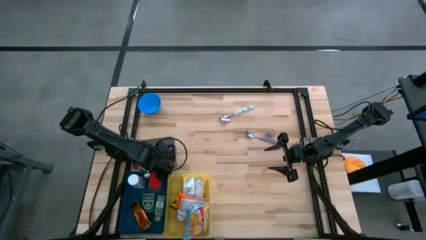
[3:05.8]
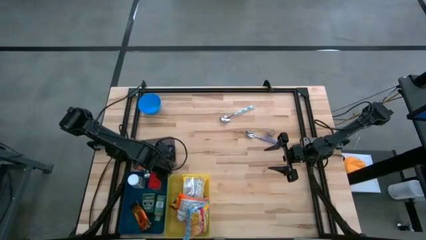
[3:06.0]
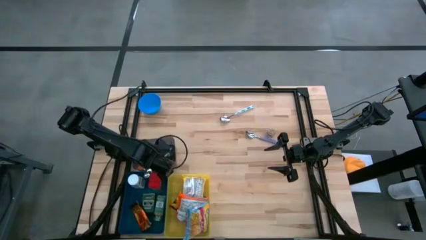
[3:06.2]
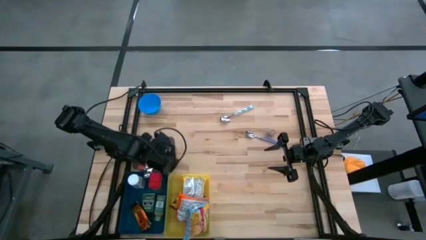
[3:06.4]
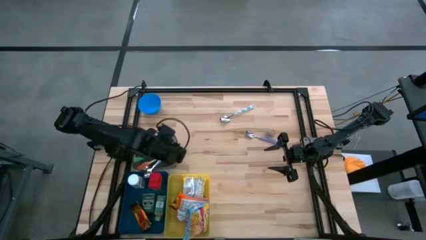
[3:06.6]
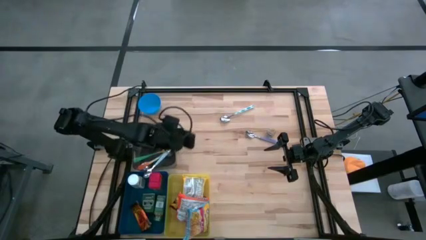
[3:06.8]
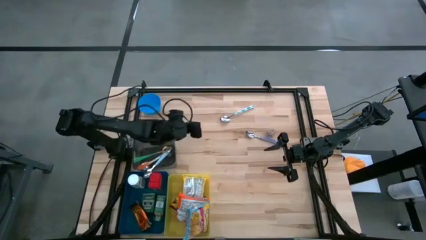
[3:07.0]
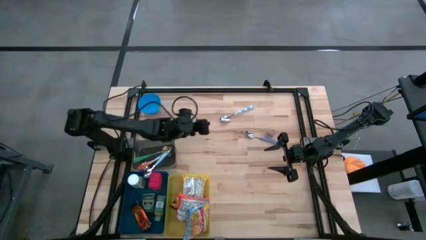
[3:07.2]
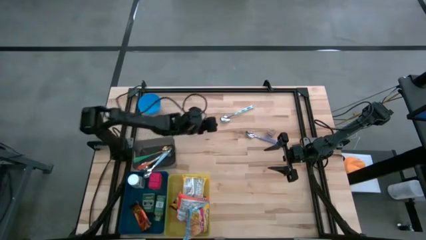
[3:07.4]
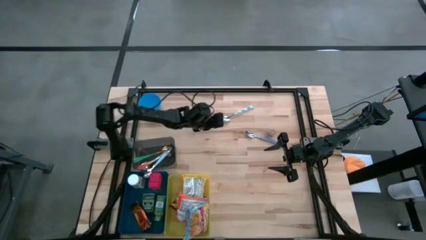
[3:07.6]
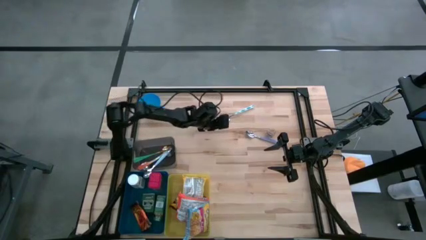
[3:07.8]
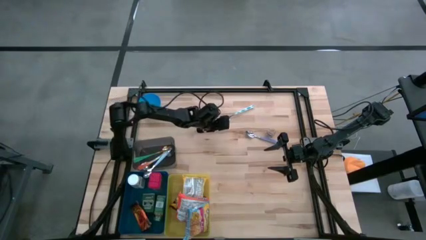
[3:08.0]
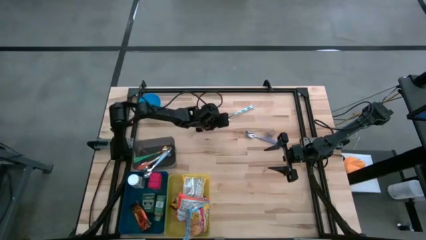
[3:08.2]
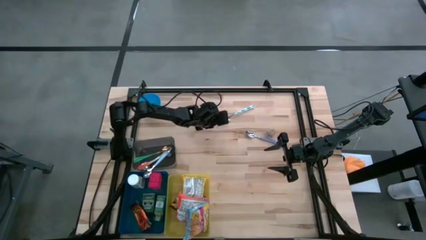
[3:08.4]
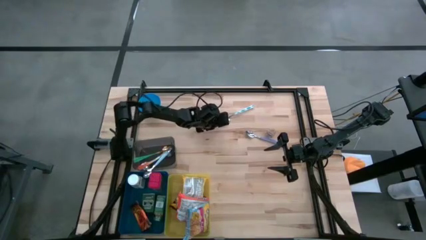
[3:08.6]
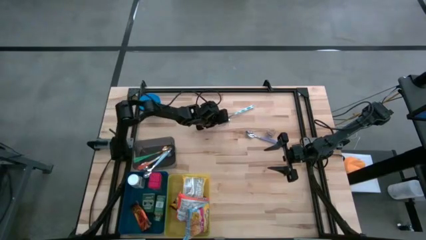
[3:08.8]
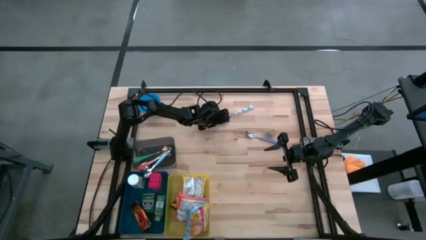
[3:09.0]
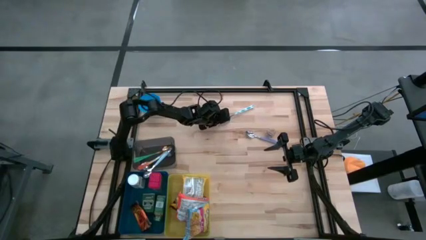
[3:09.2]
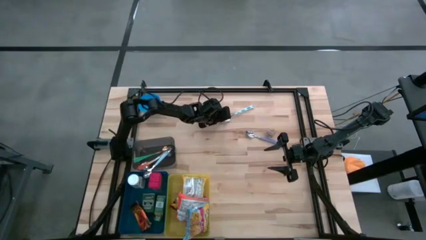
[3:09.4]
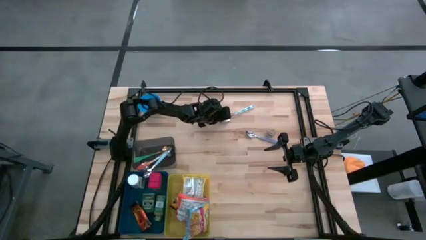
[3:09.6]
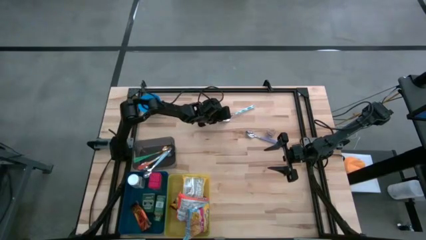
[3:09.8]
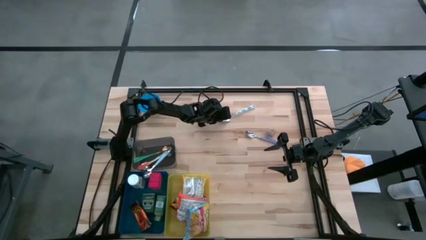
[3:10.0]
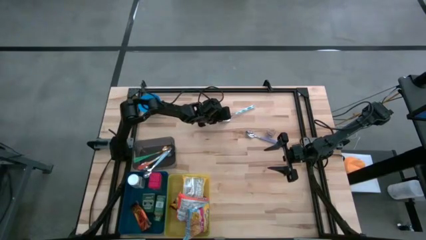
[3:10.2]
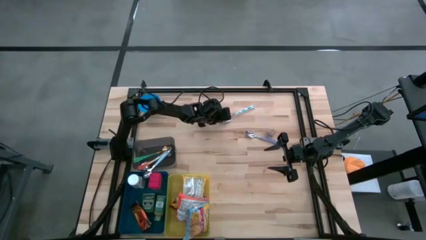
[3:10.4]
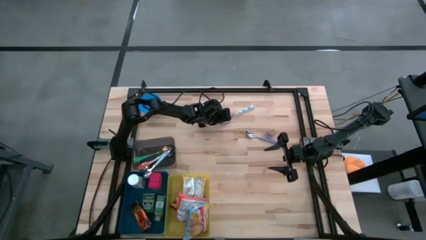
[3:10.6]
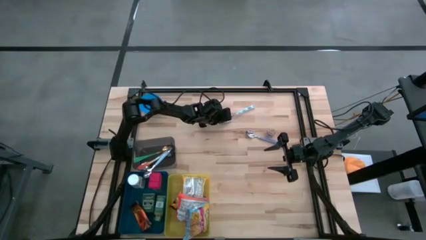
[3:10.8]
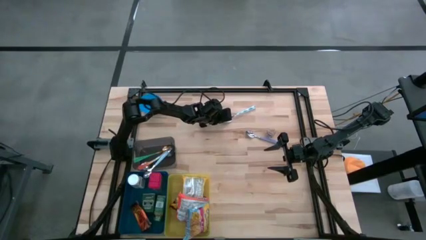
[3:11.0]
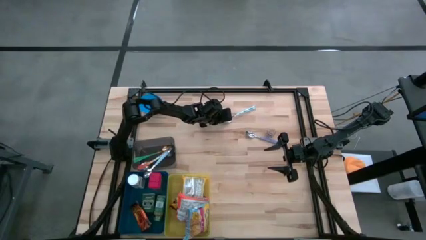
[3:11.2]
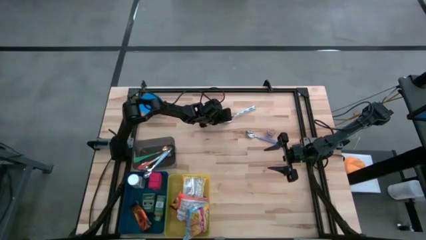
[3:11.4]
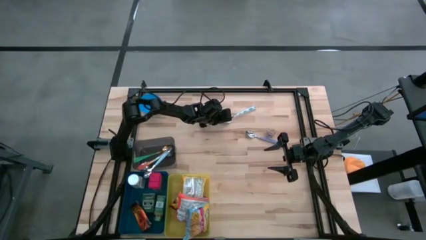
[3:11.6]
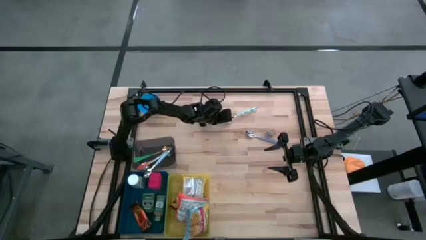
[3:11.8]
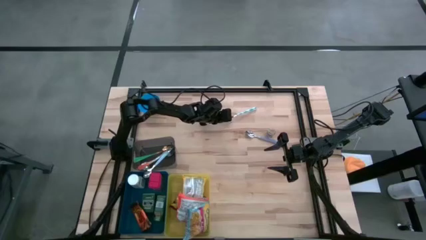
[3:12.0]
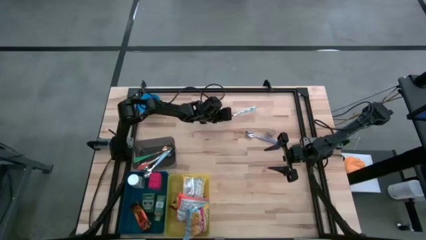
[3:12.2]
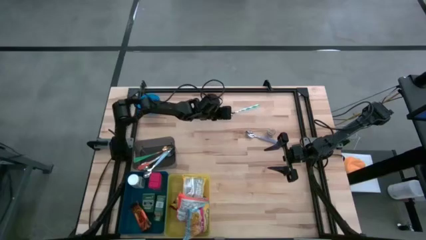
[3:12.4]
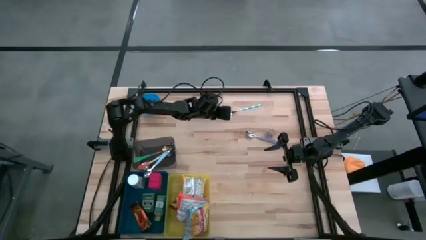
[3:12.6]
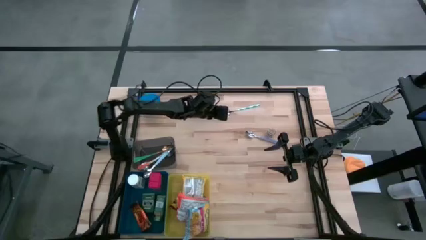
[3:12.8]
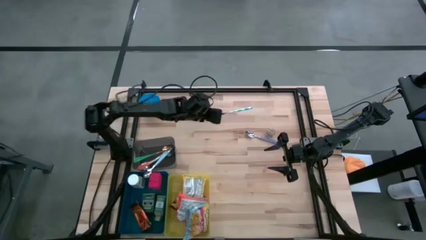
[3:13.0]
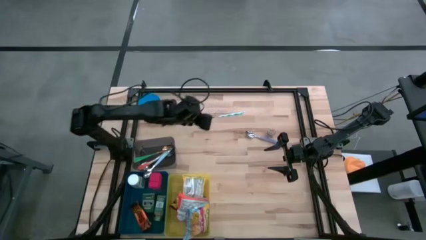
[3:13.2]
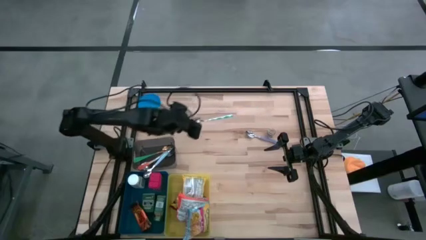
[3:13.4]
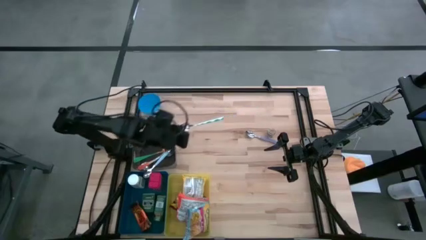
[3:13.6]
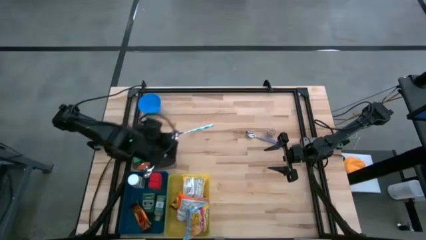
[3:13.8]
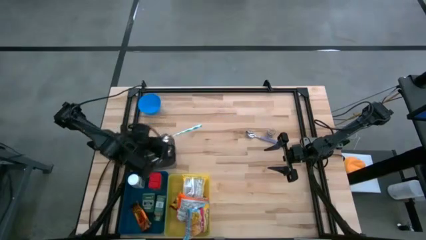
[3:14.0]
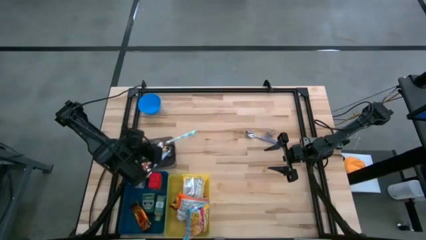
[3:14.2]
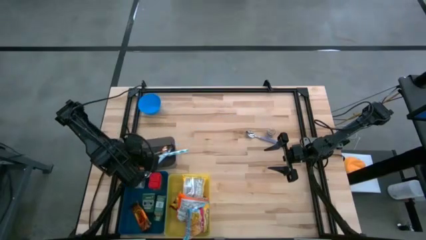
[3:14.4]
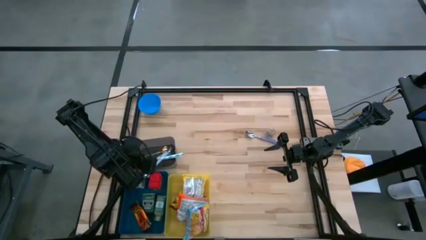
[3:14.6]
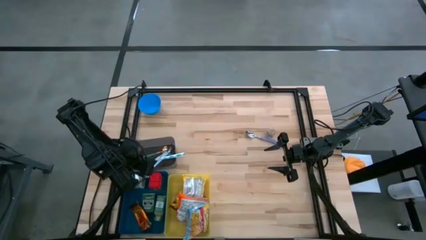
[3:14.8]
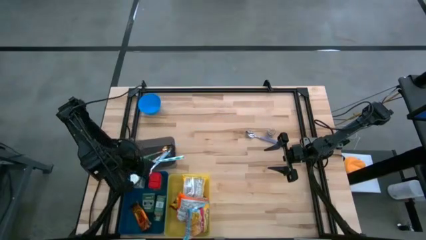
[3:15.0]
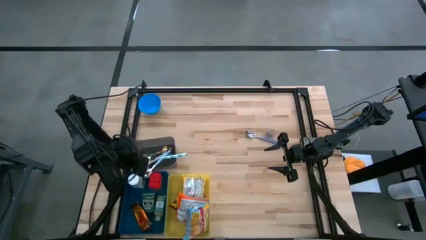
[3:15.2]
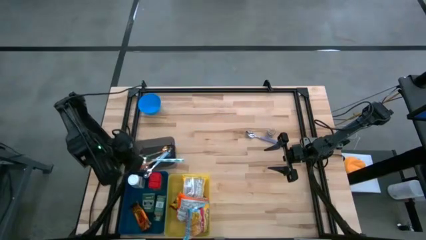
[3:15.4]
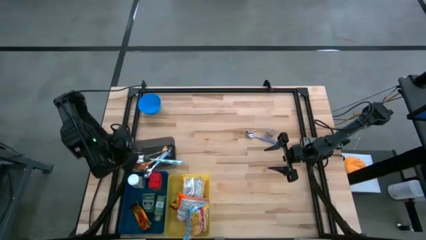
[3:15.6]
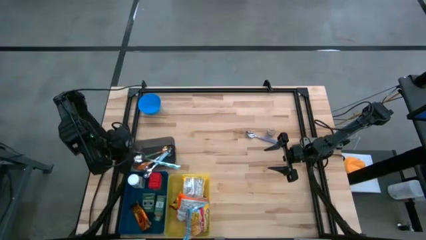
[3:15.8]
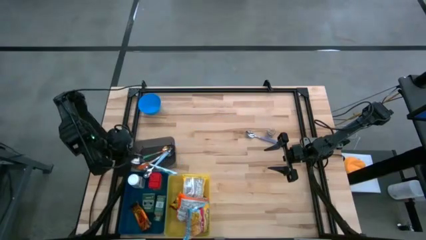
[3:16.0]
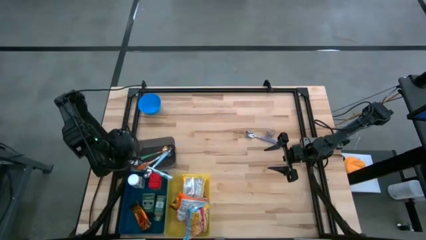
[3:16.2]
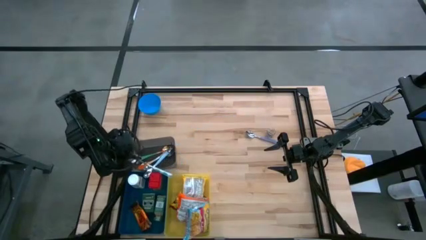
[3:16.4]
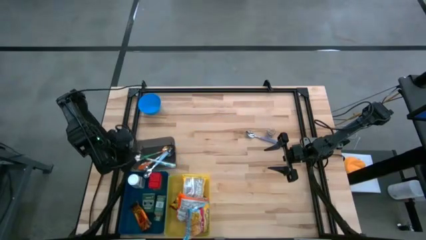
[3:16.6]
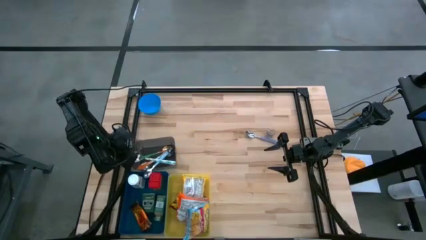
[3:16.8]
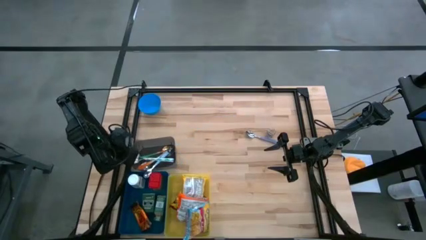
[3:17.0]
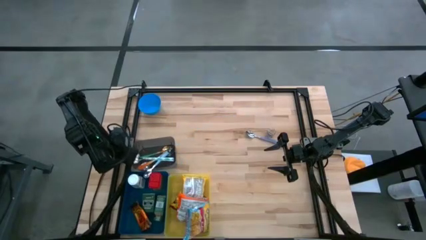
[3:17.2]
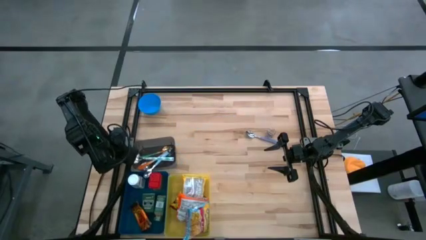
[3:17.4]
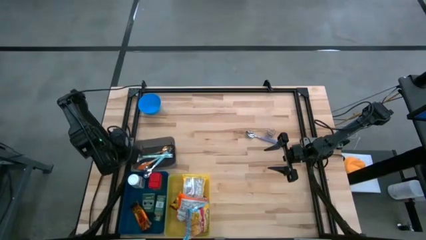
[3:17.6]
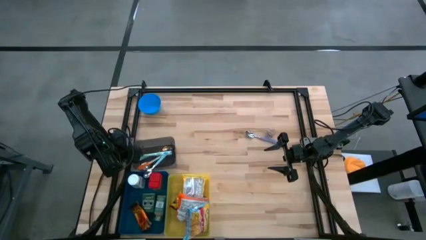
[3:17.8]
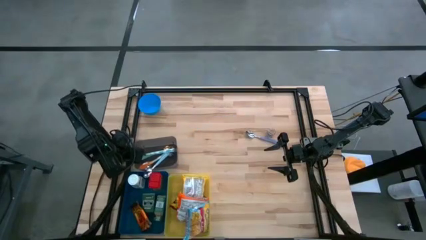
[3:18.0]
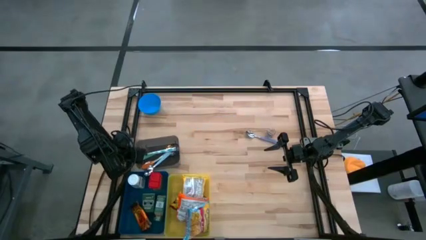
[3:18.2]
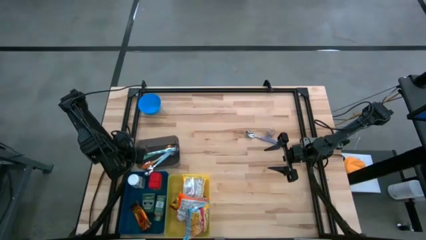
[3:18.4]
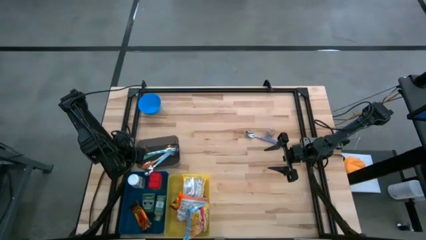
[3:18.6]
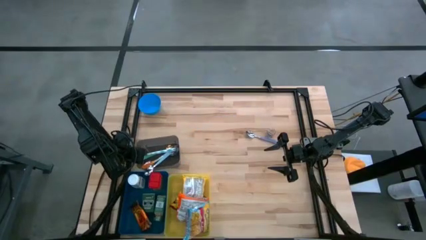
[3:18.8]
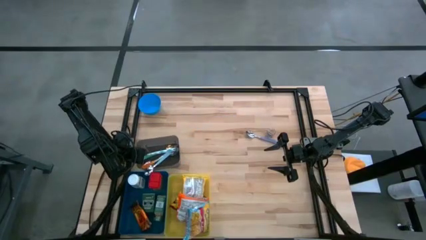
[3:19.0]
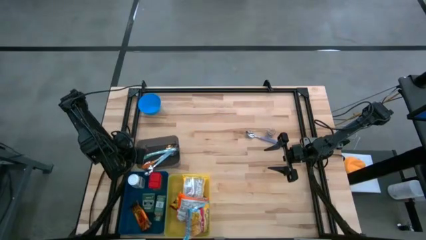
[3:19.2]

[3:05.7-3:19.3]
Put the patterned blue spoon into the gray bin

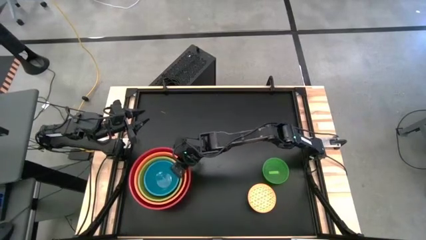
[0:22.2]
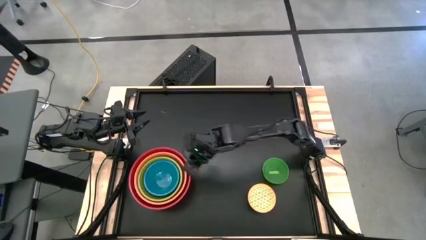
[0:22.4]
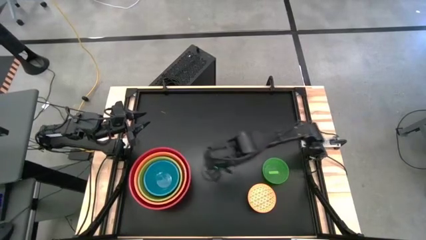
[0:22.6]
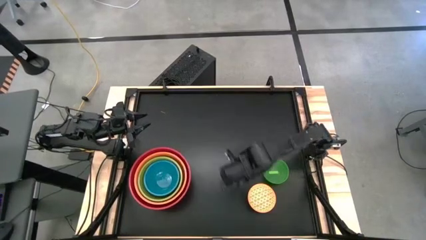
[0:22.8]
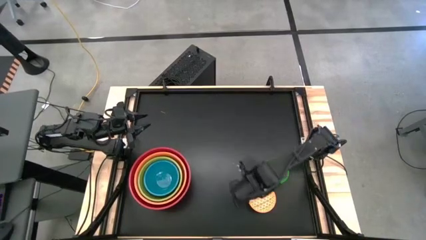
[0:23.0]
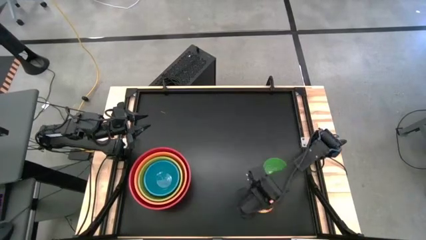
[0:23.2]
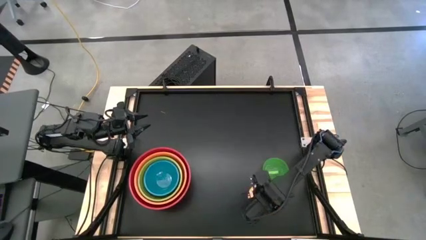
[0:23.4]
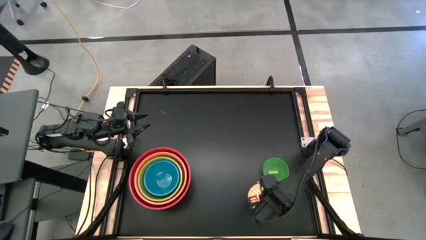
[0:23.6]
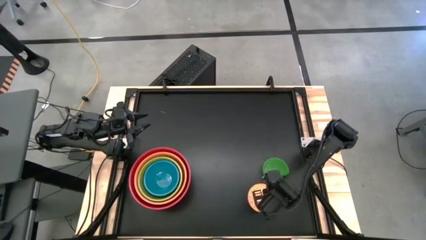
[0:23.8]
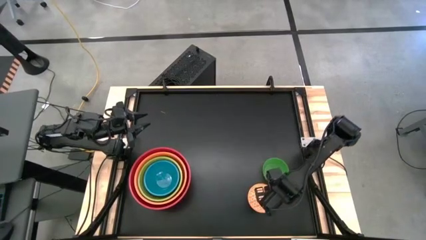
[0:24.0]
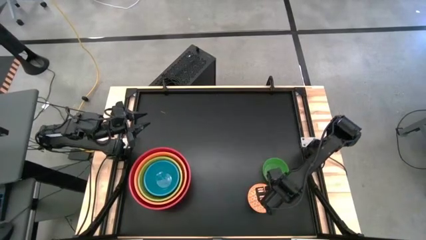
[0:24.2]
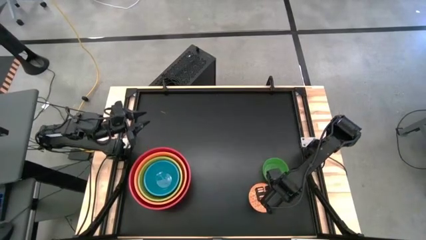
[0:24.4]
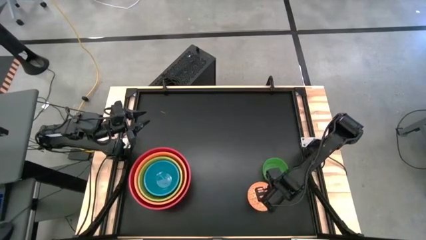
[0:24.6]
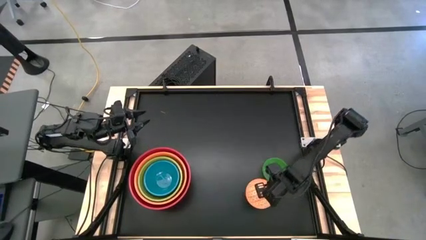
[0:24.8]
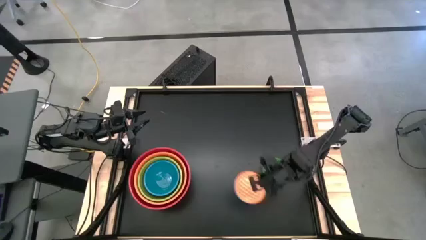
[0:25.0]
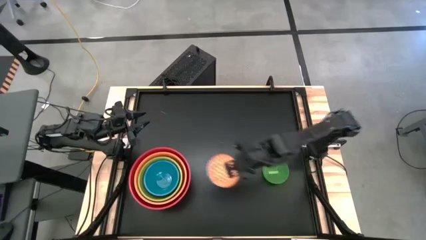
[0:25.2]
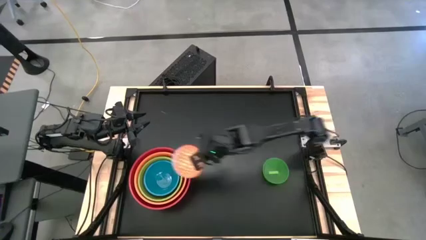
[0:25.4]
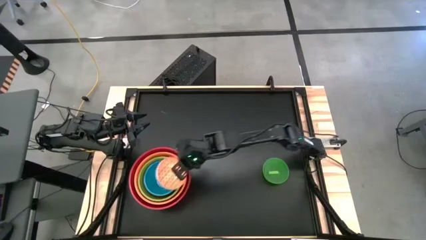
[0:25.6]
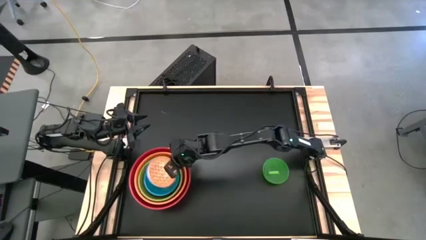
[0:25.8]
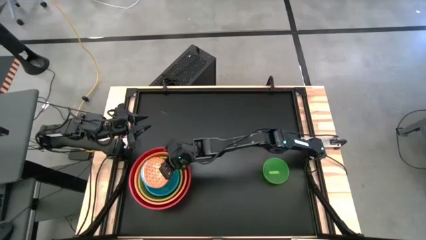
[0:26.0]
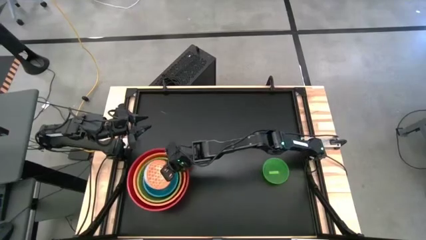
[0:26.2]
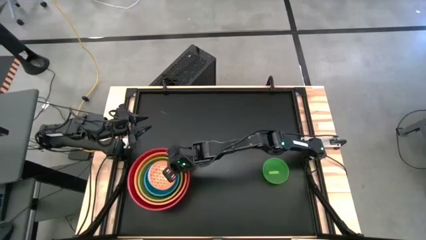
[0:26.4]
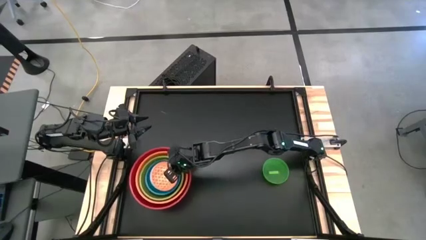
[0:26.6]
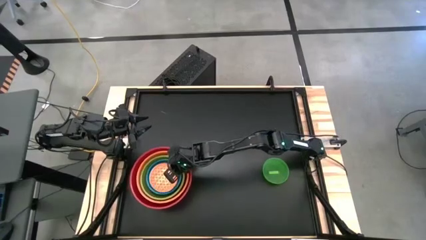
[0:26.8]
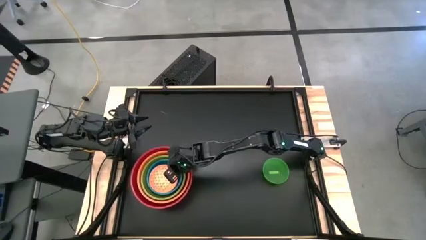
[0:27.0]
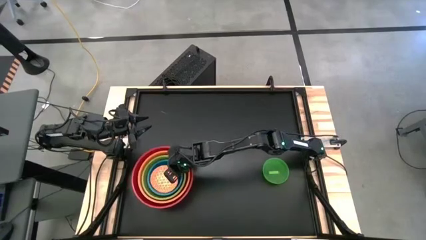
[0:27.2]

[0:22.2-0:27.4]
Stack the patterned orange bowl into the blue bowl
